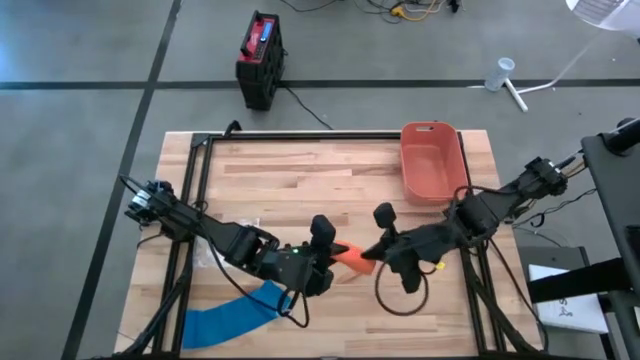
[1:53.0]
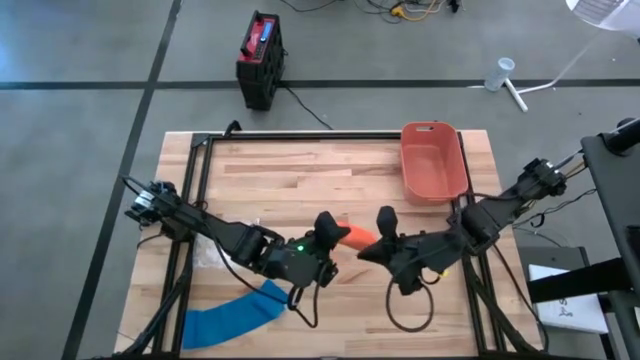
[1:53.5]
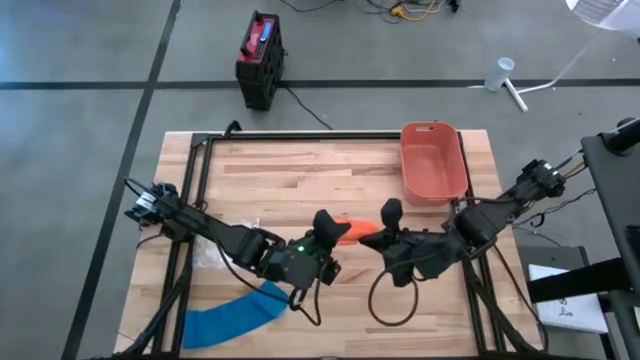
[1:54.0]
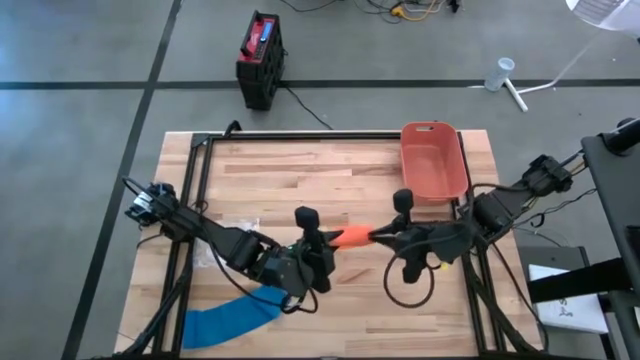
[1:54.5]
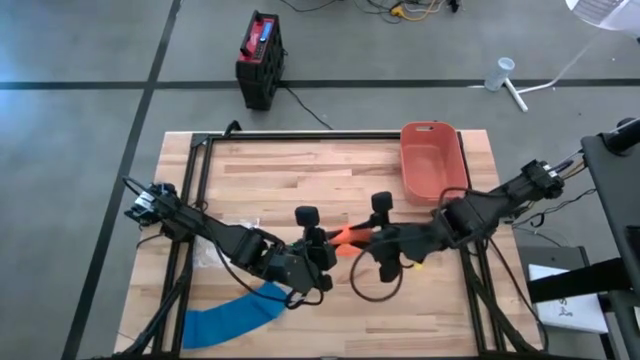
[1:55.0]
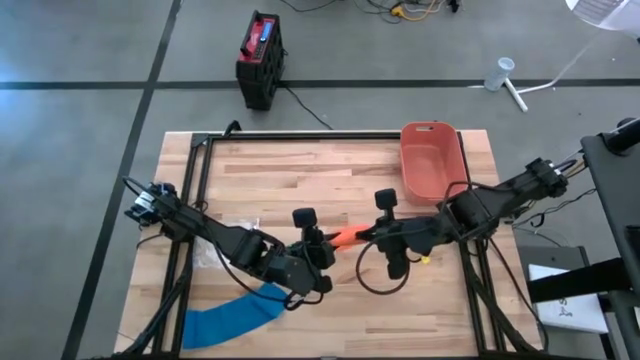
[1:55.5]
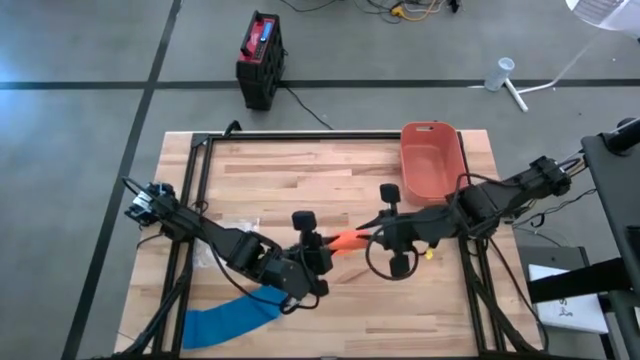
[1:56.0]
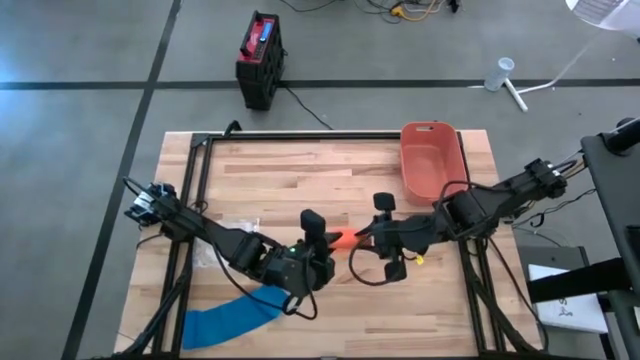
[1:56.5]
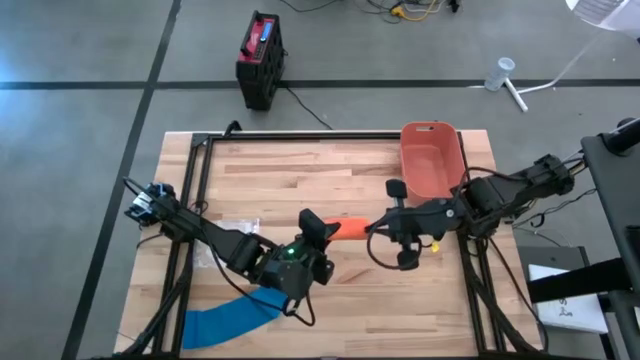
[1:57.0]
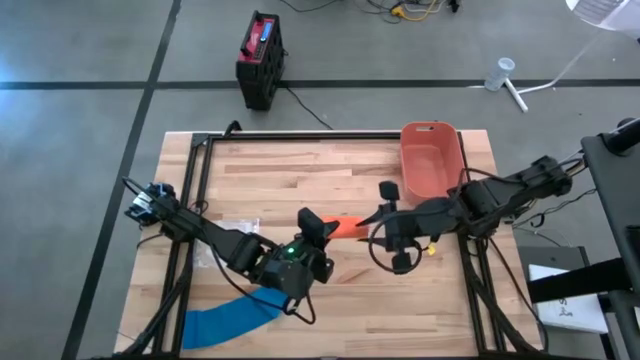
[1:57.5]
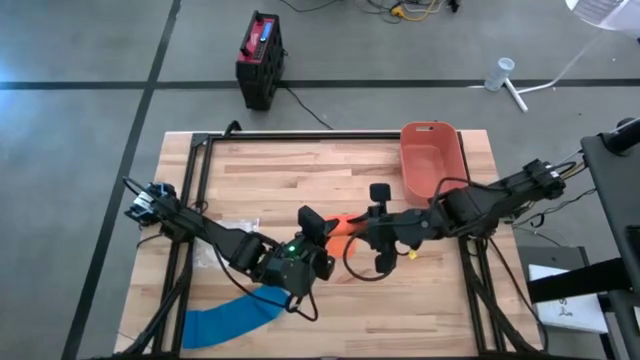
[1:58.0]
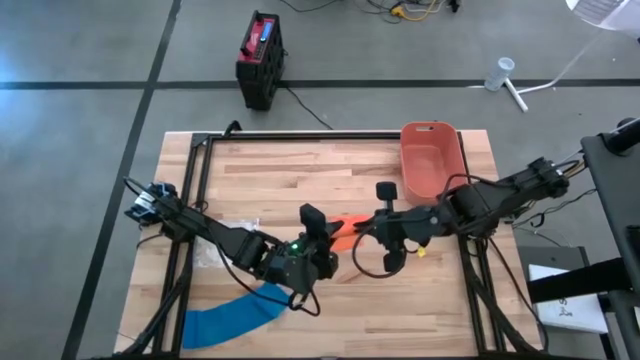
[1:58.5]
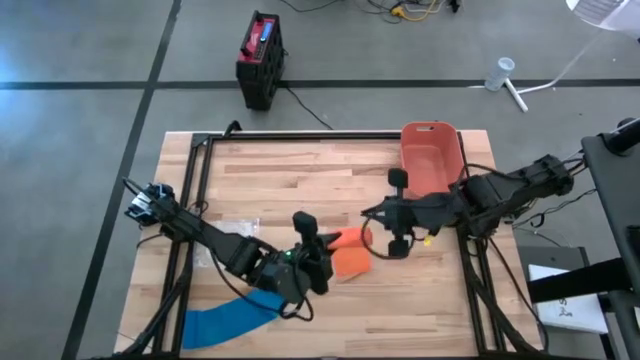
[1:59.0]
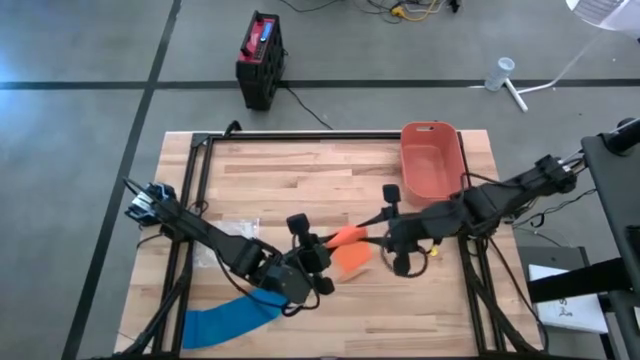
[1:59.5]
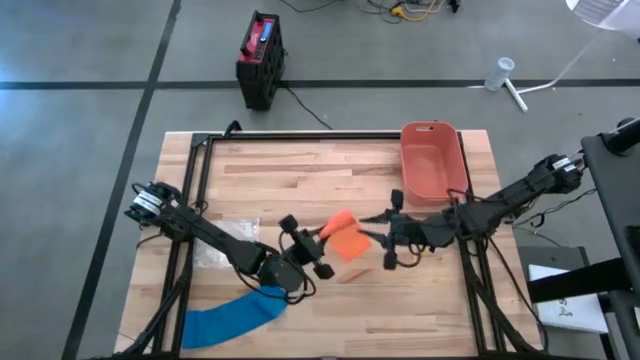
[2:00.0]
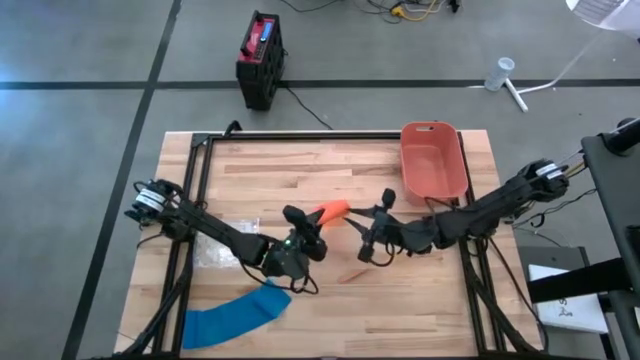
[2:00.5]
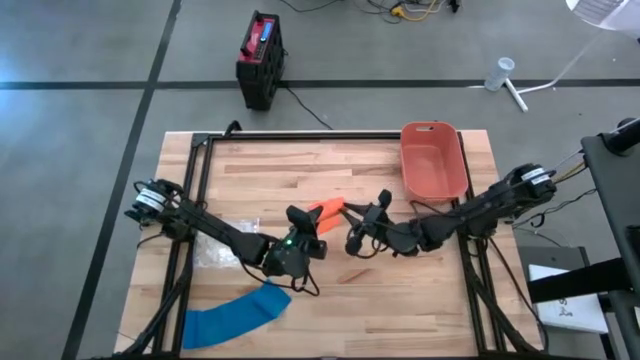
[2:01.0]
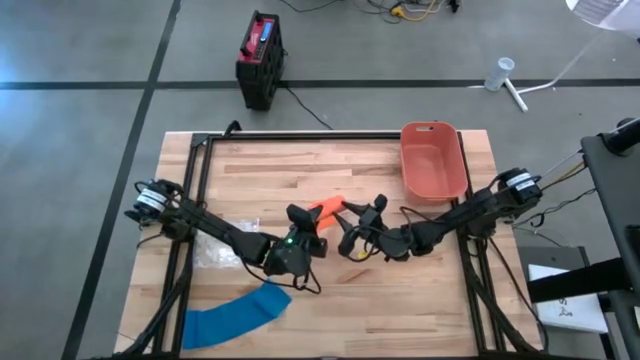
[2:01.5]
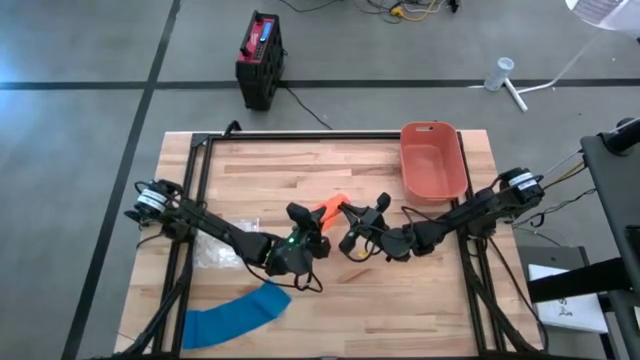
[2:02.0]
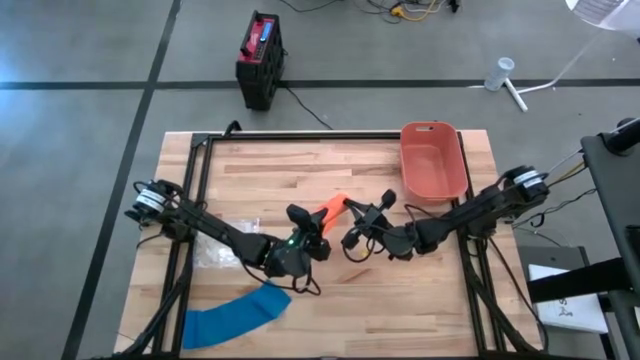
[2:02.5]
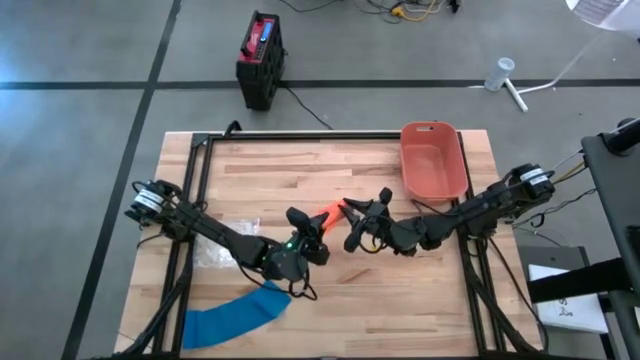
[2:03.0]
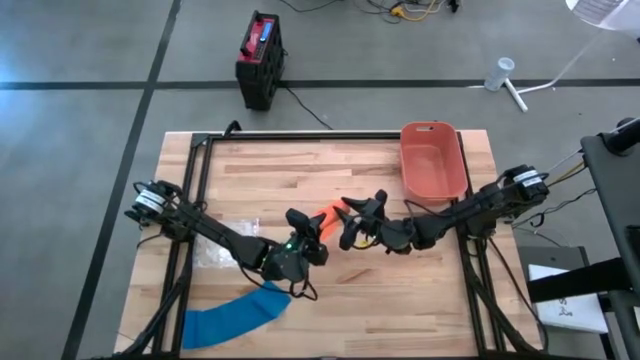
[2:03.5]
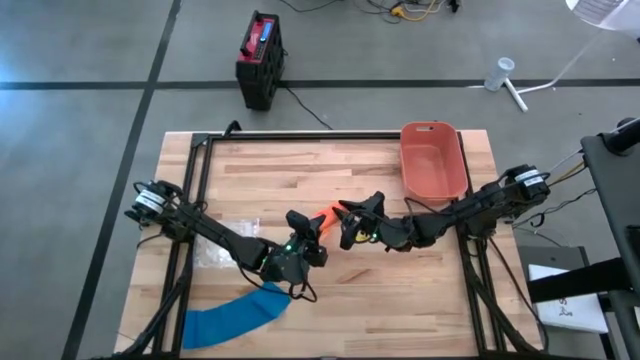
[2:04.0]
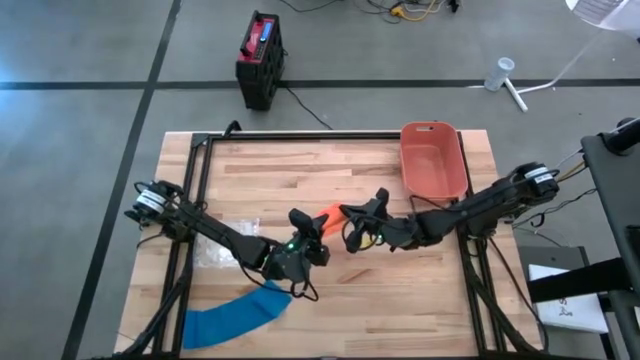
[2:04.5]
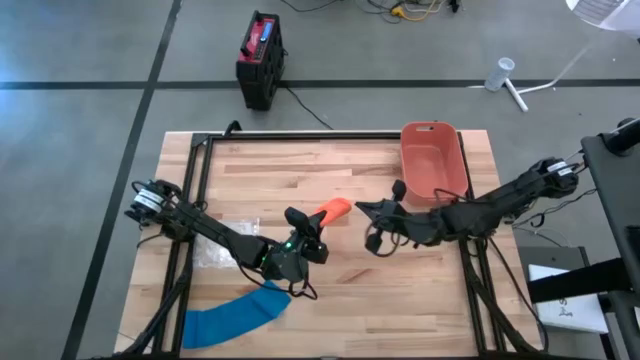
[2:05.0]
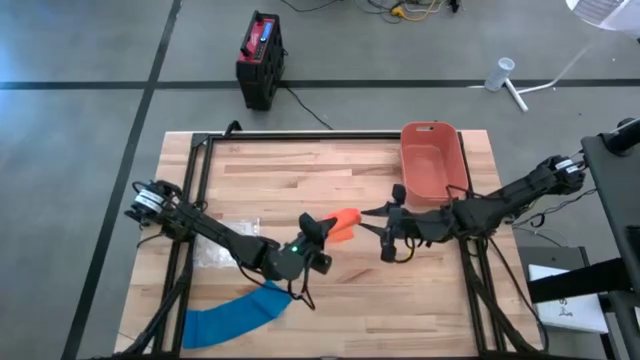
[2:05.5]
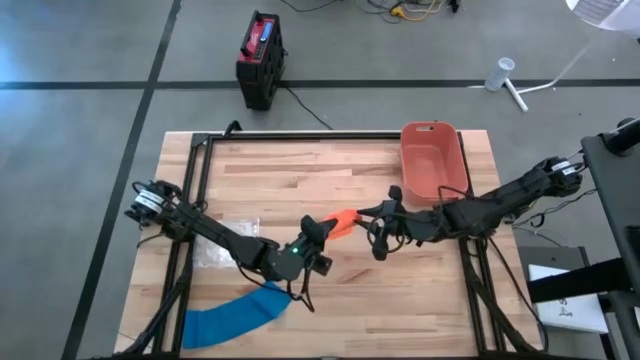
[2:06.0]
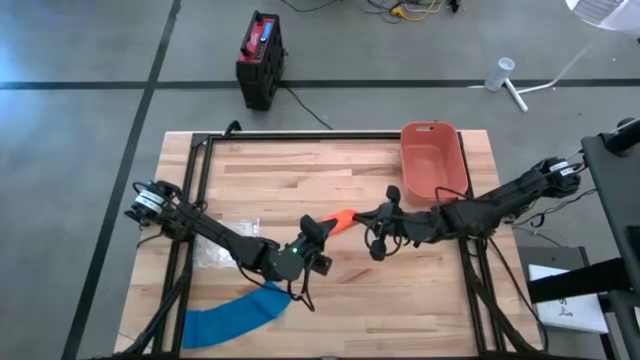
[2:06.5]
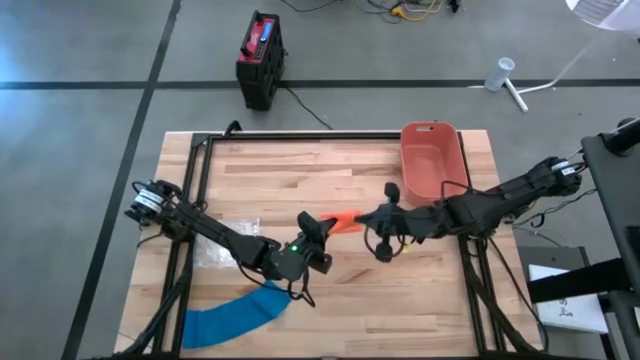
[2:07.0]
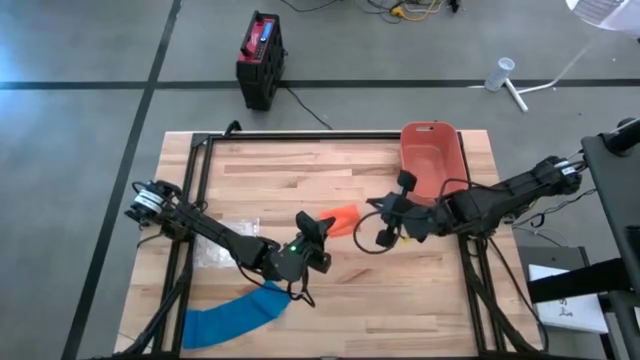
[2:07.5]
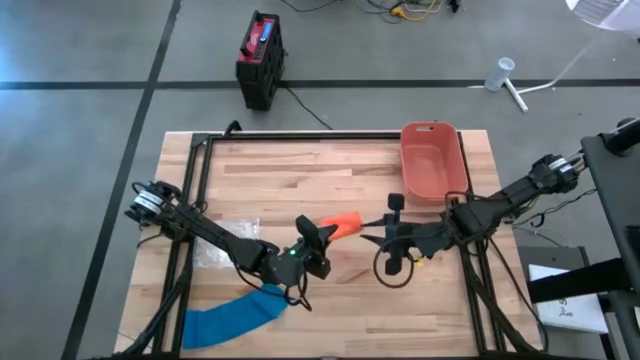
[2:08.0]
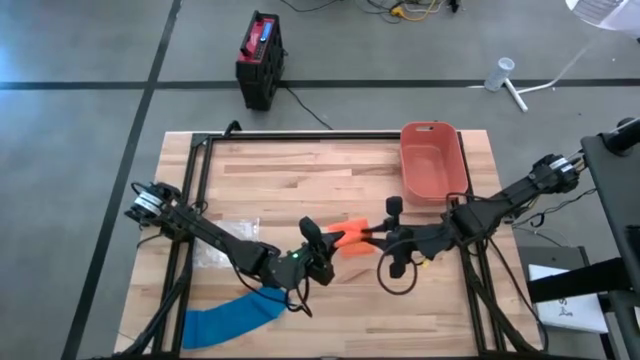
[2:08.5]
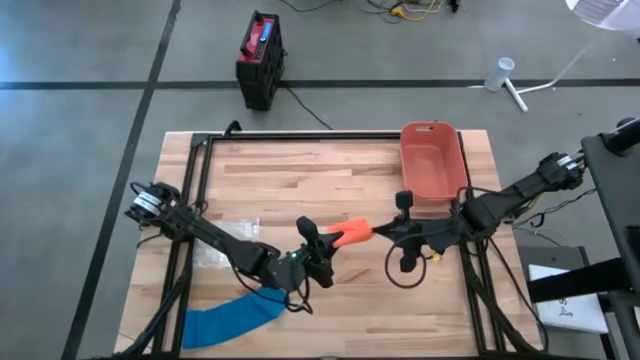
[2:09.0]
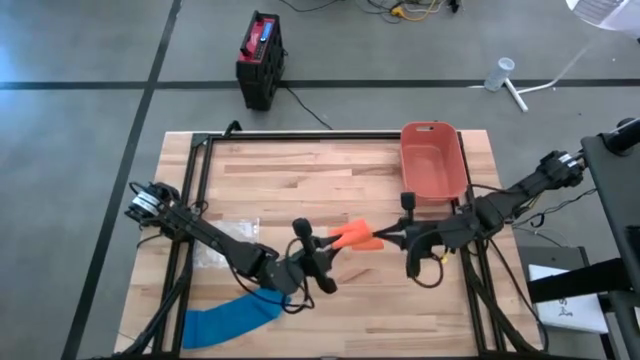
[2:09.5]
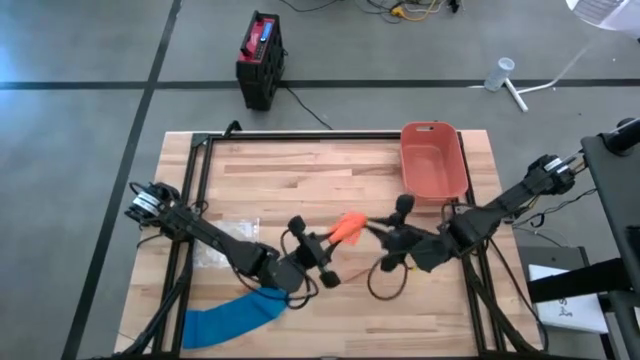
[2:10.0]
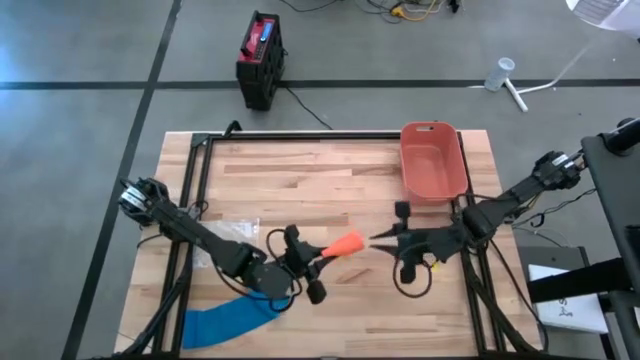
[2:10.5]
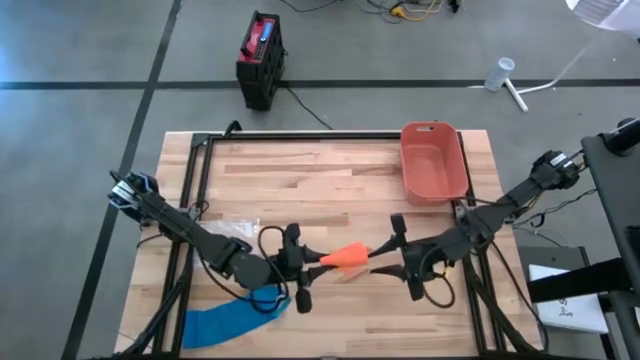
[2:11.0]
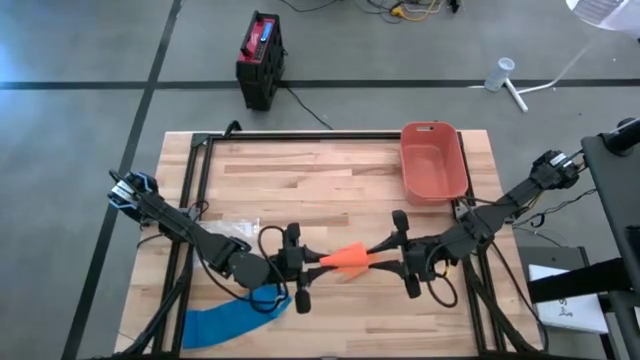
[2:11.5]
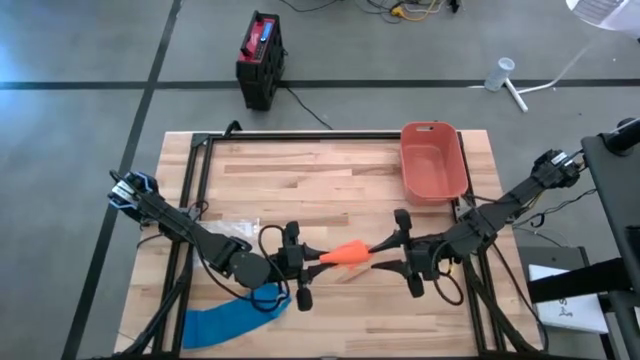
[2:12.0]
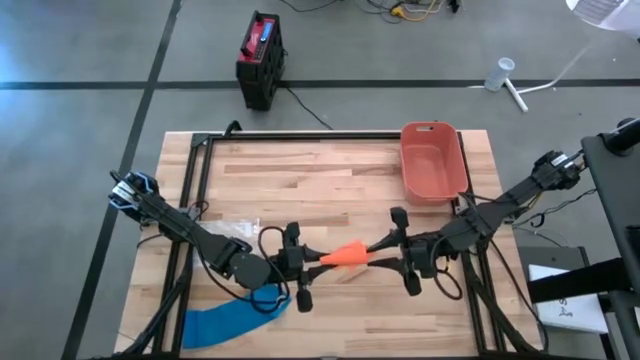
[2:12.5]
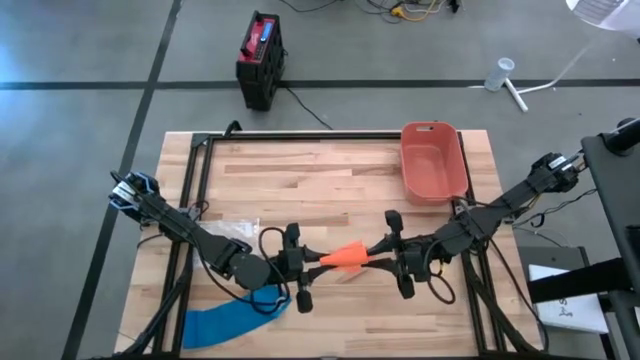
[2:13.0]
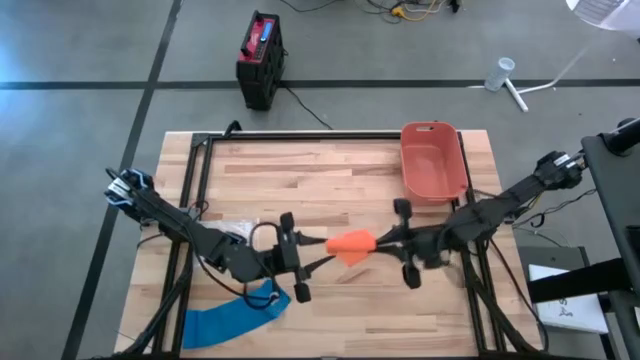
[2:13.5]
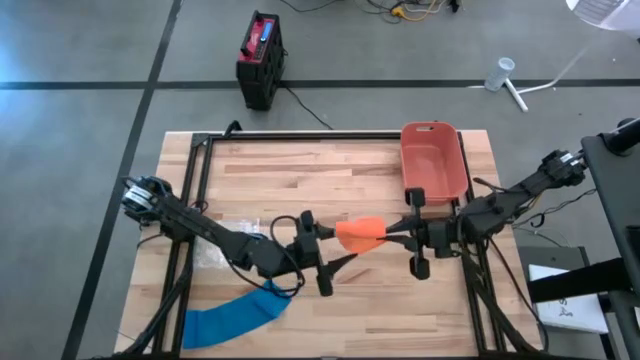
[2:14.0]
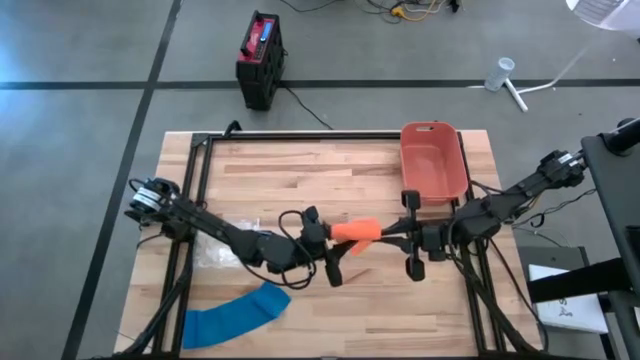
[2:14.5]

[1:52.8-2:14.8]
Task: Roll bandage
Roll the orange bandage
